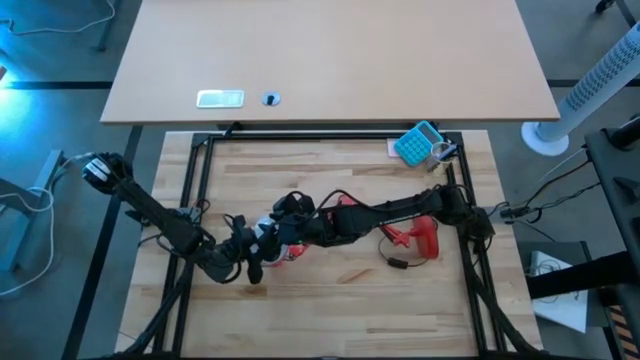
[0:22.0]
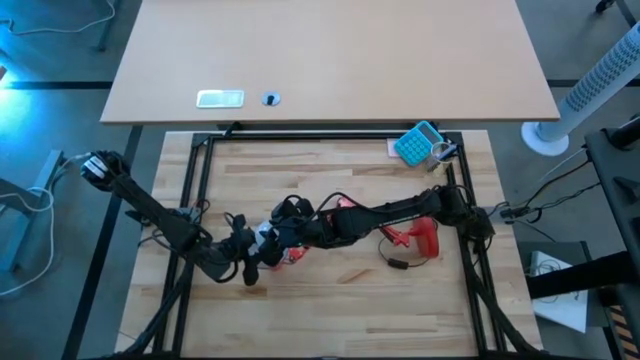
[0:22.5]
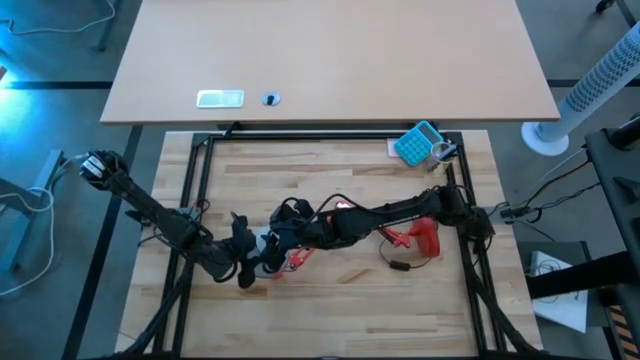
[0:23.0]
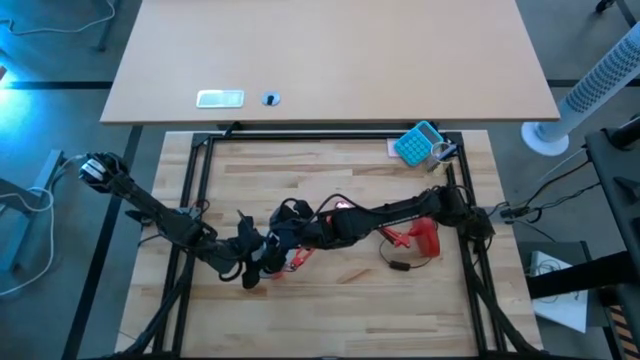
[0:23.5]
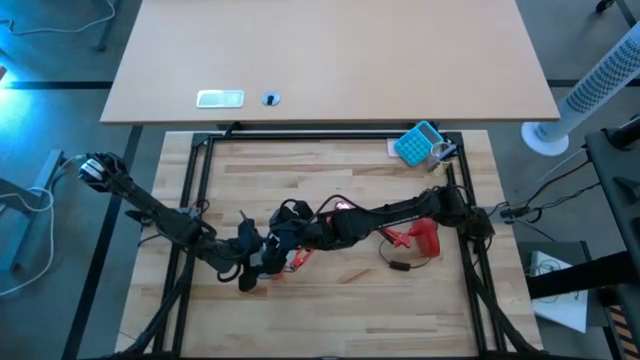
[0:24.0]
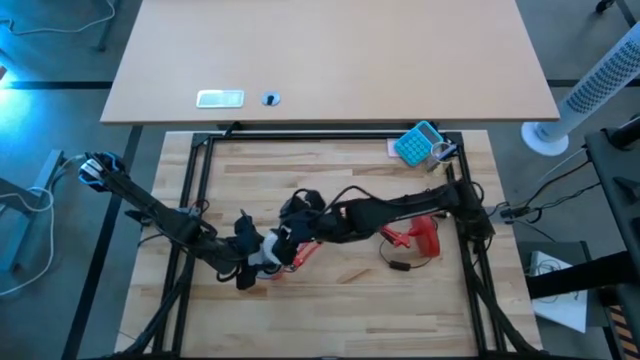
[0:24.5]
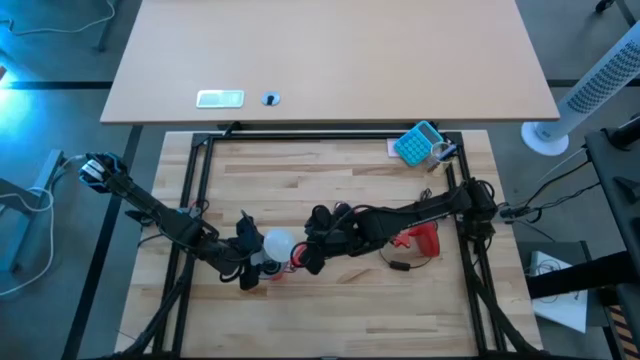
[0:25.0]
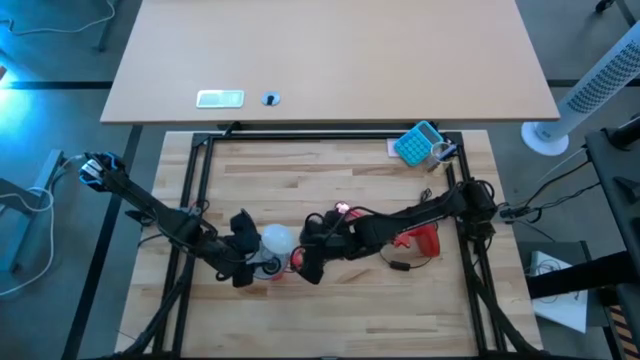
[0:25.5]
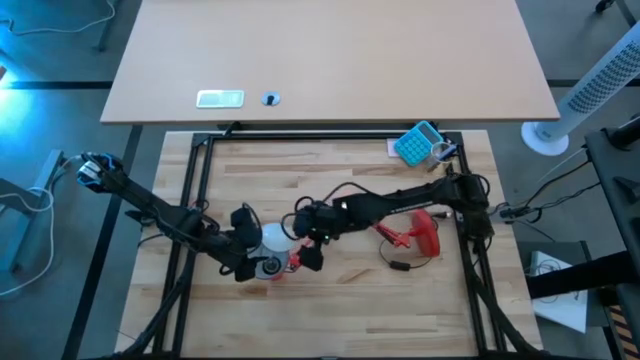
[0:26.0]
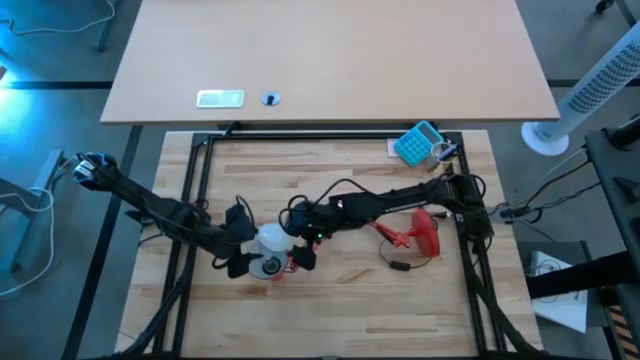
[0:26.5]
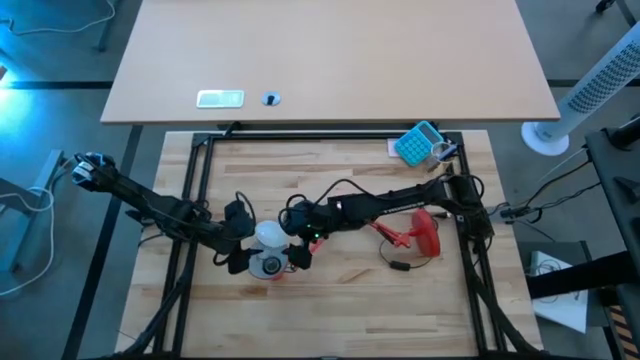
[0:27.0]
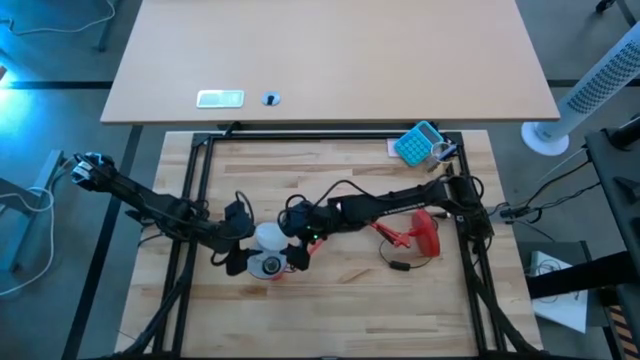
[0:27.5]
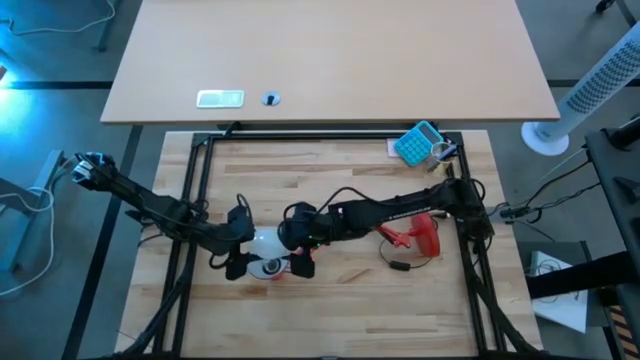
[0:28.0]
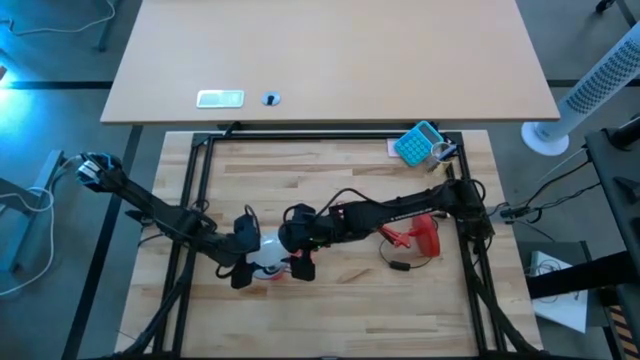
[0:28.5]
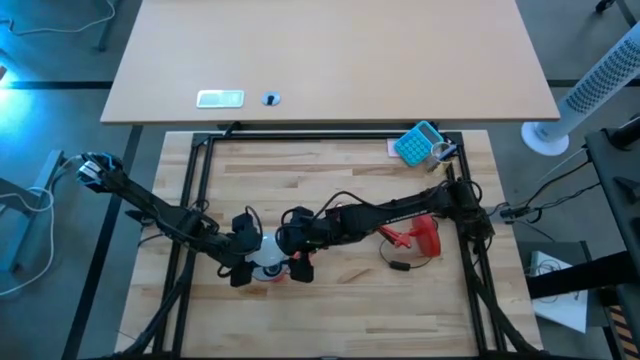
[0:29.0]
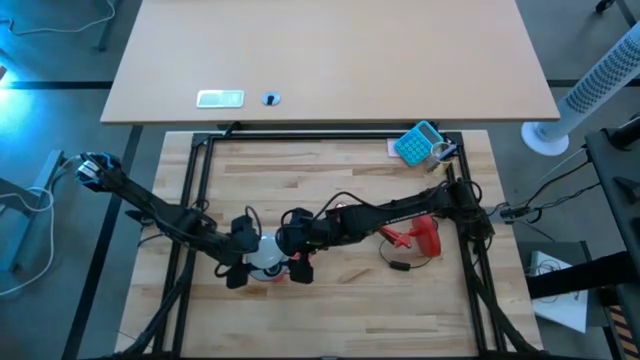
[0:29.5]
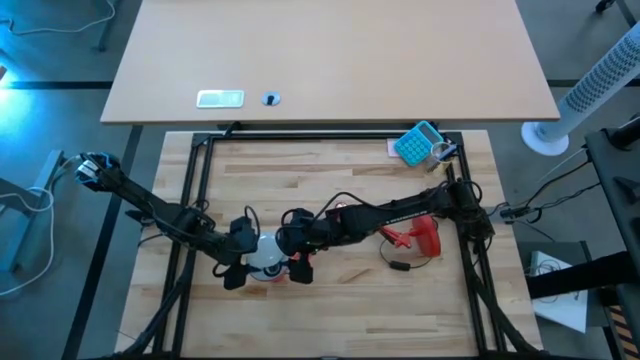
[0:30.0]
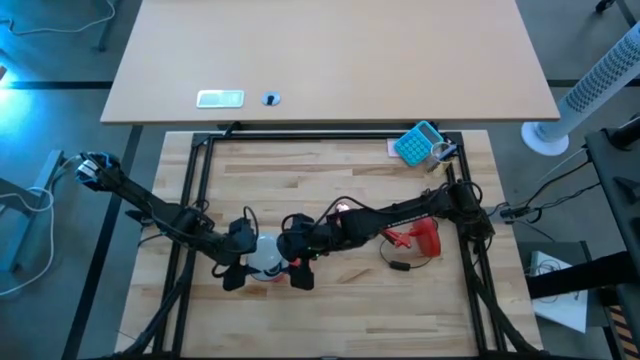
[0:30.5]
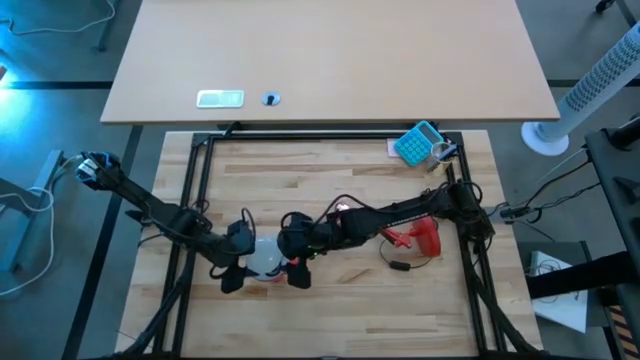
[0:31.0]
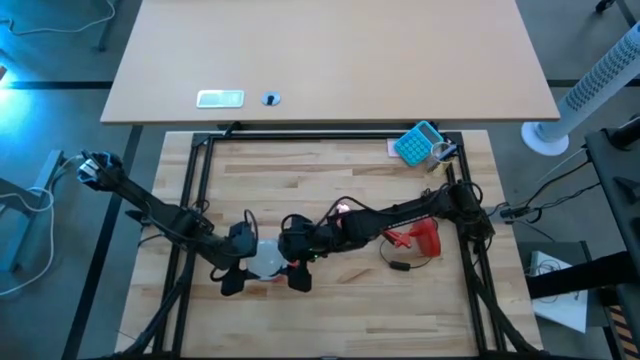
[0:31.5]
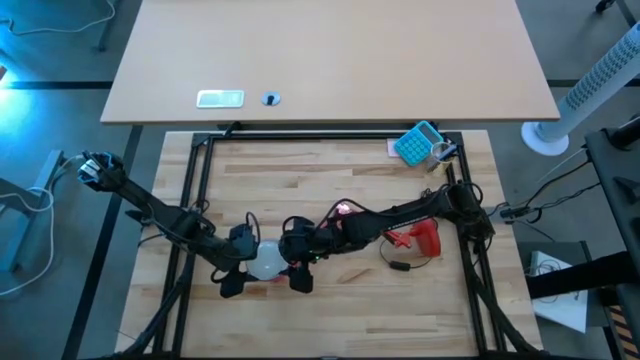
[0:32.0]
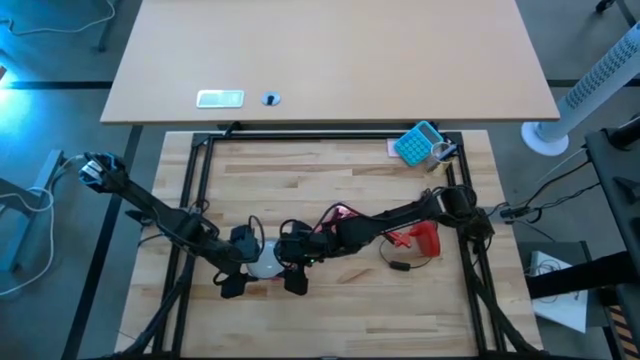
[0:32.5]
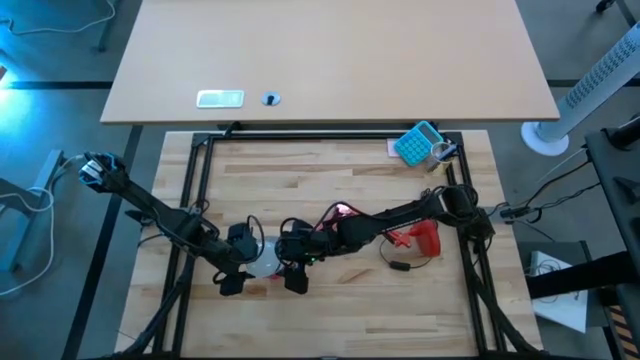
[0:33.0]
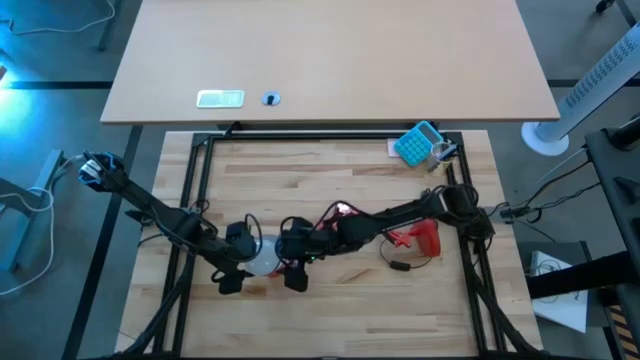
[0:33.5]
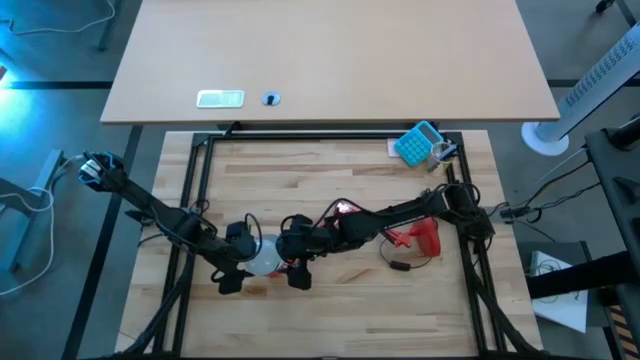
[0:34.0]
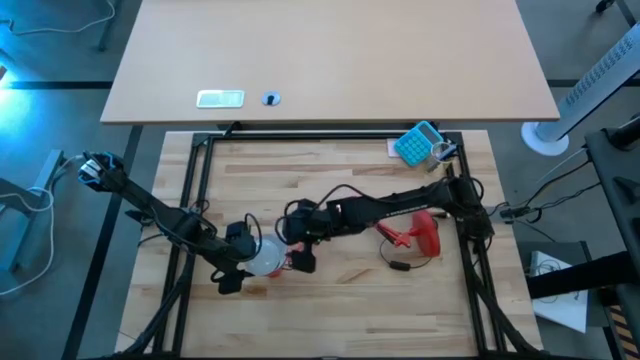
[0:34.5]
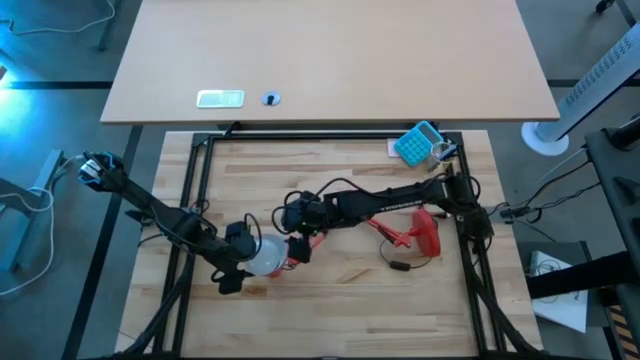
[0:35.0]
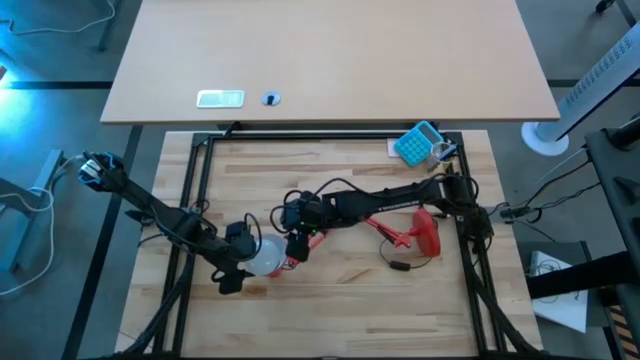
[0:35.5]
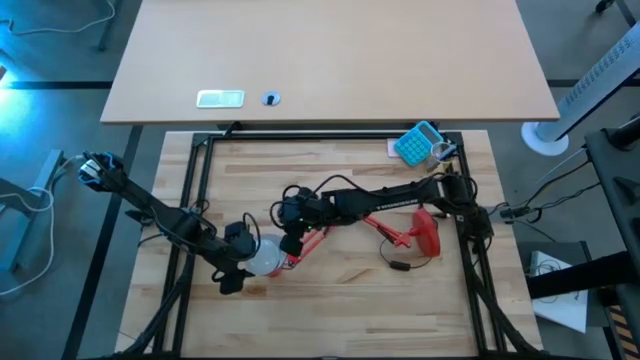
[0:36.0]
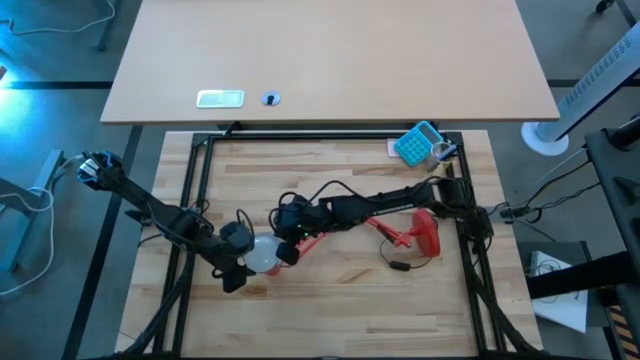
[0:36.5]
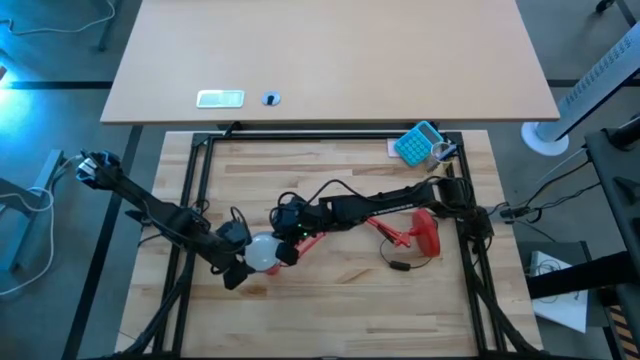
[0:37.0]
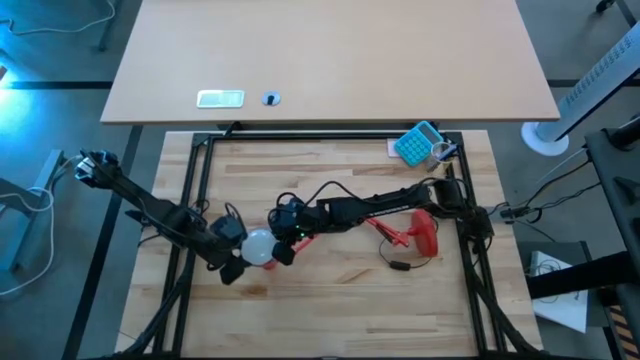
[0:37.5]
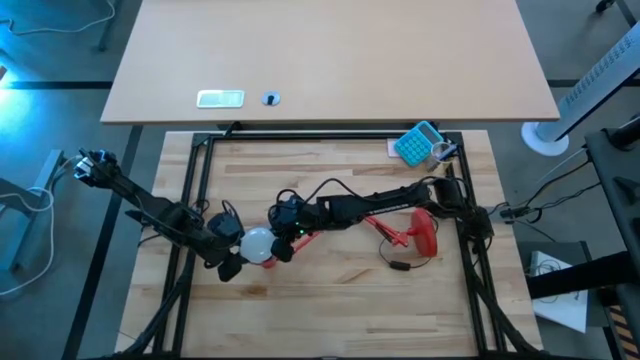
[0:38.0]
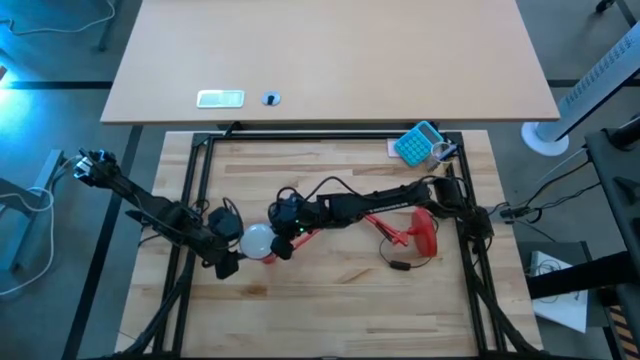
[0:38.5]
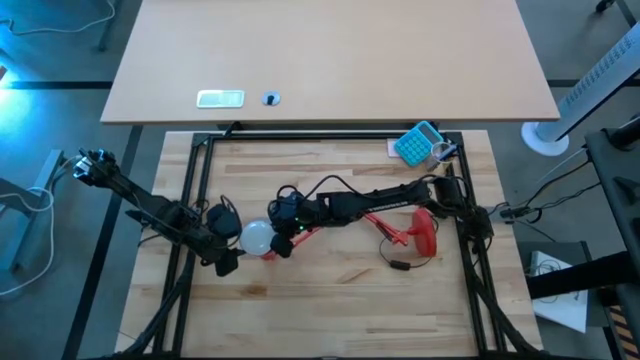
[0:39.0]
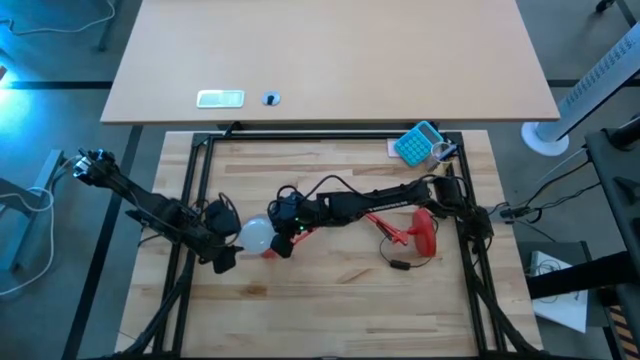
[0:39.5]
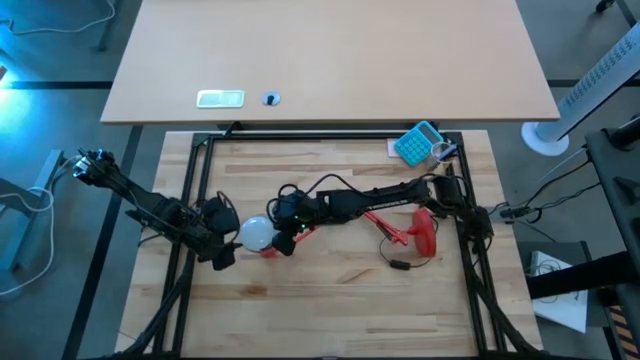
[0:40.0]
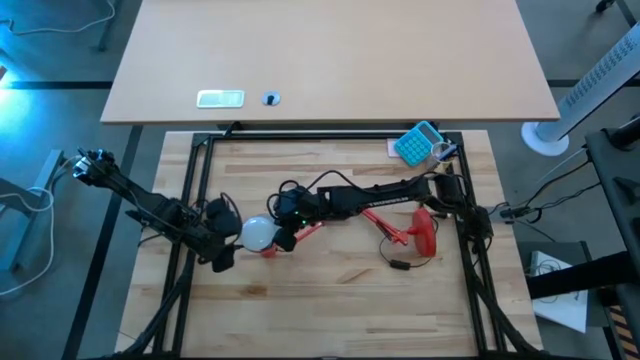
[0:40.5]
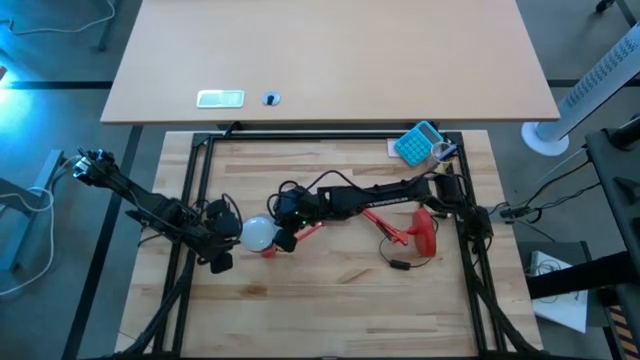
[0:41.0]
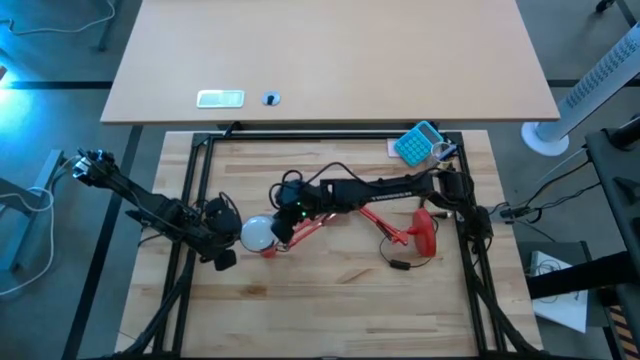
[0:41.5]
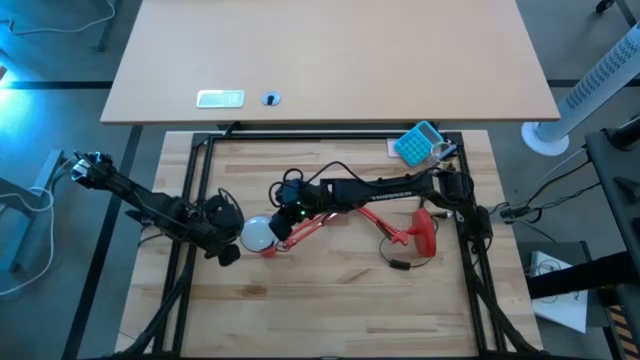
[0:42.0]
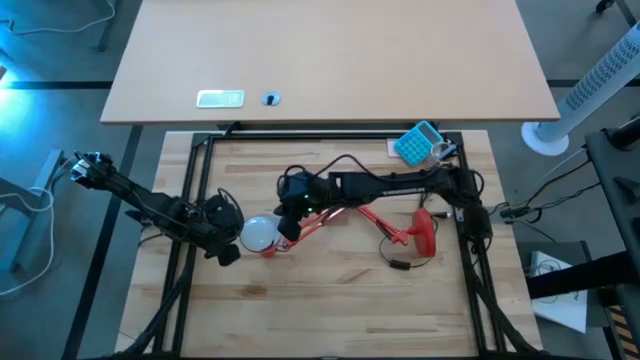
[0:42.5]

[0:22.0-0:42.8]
Task: Screw lightbulb
Insert the lightbulb into the orange desk lamp
